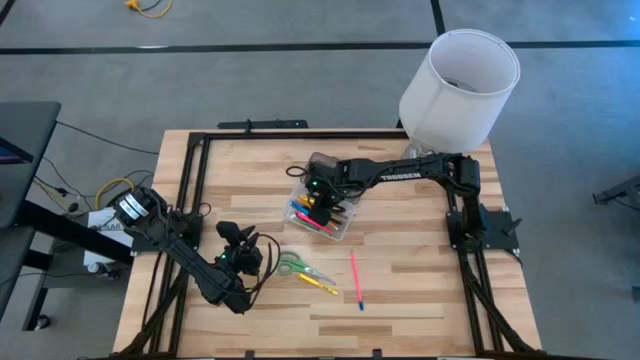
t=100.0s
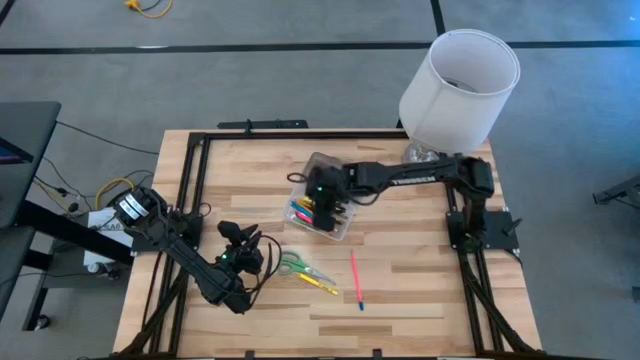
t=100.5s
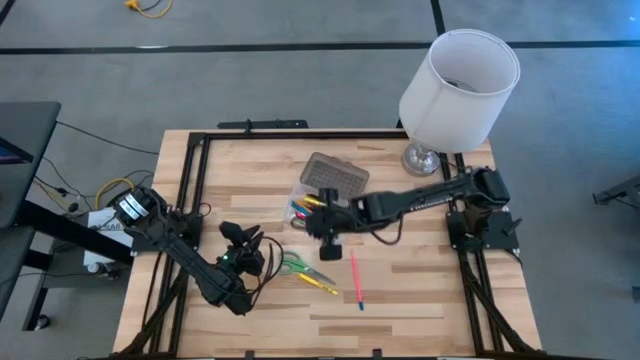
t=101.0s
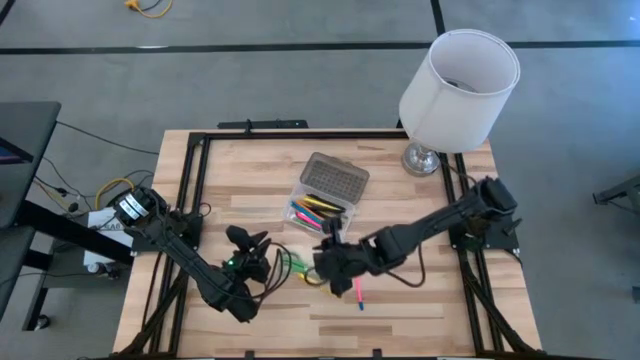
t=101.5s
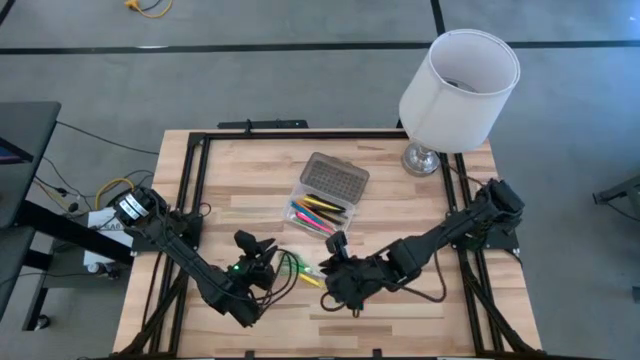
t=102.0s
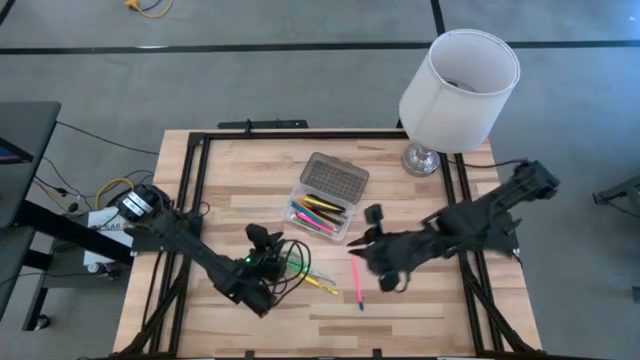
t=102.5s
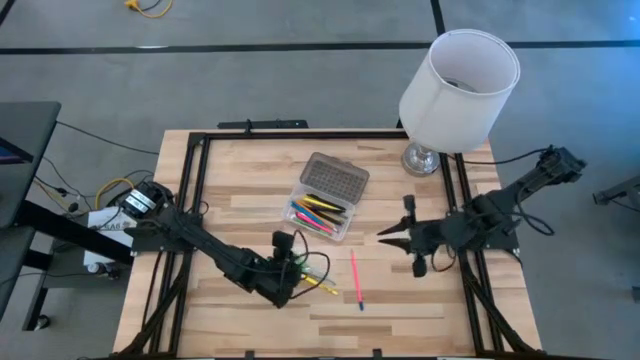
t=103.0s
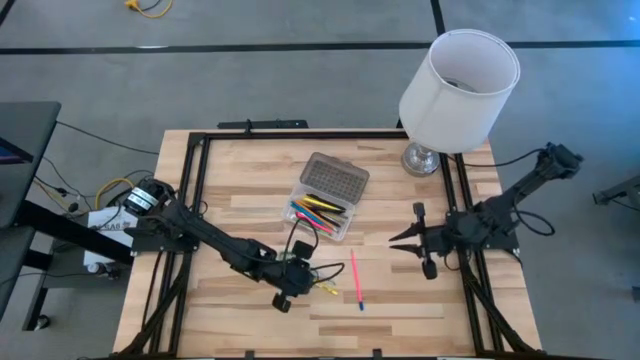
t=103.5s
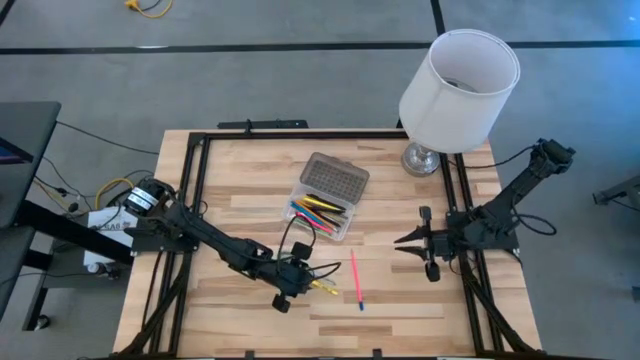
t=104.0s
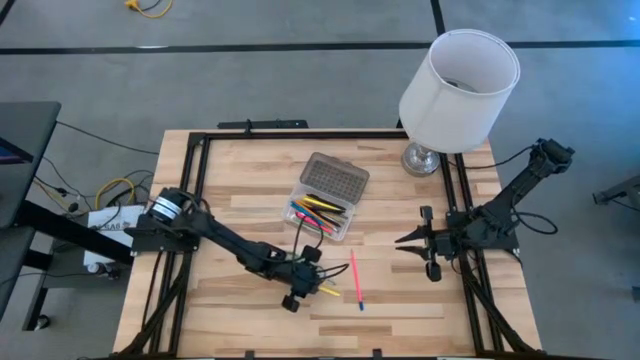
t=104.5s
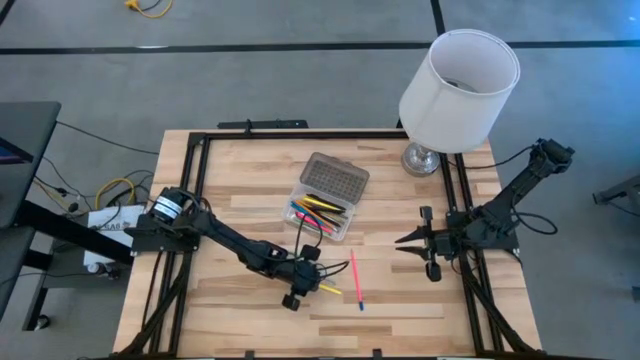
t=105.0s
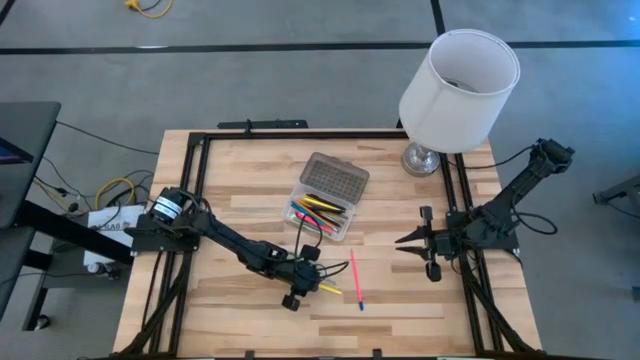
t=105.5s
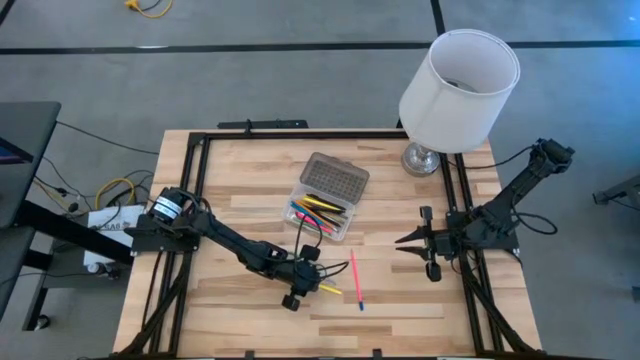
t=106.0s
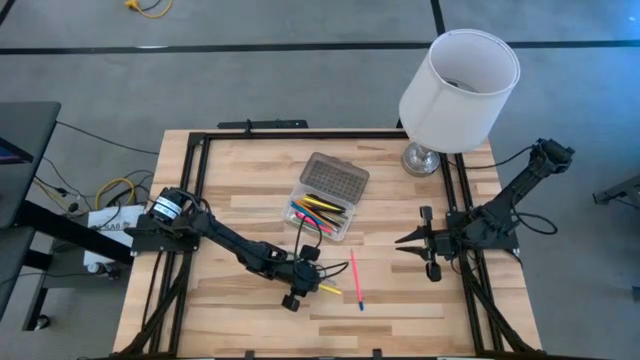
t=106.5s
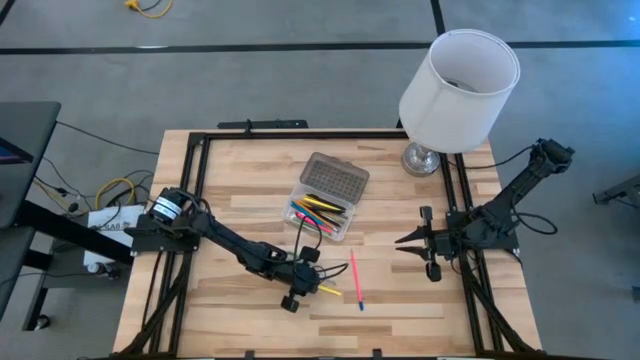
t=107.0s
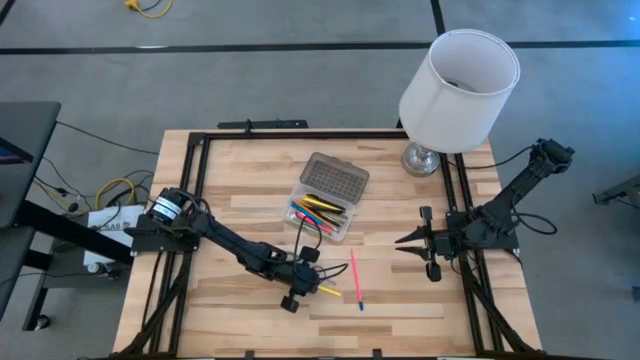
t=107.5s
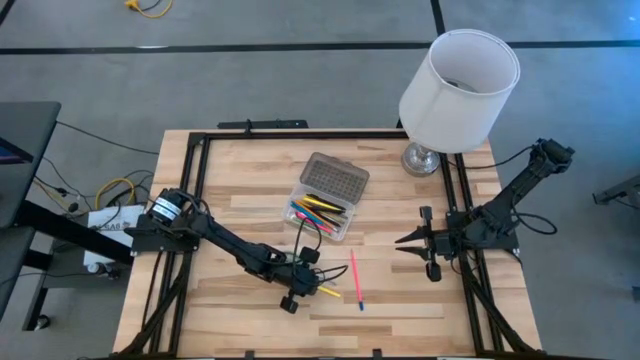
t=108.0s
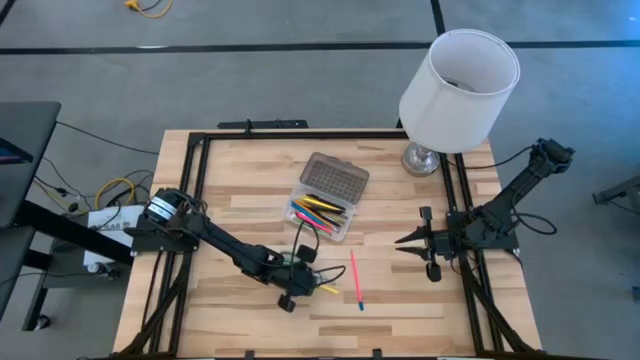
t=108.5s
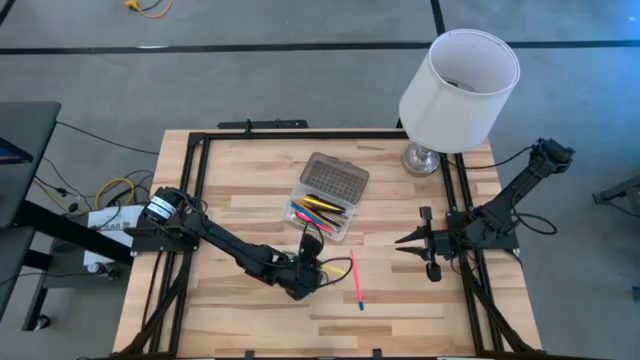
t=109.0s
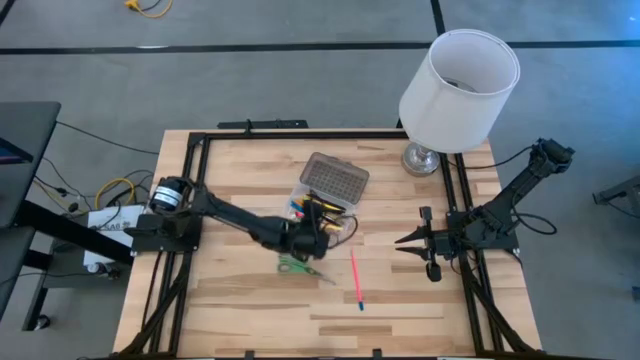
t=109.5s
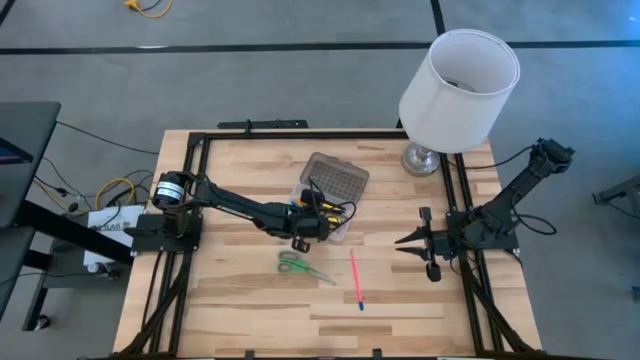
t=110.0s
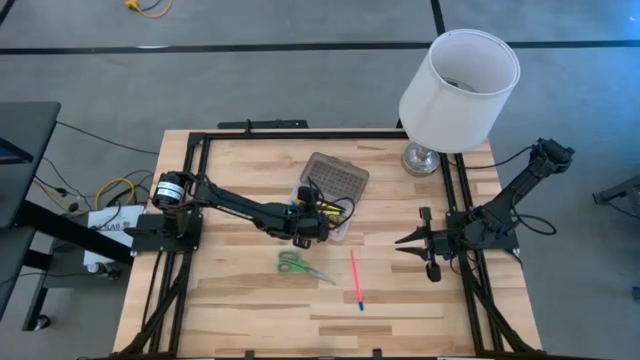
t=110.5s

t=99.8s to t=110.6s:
Task: Pick & place school supplies into a supply box
Put the yellow pen into the gray supply box

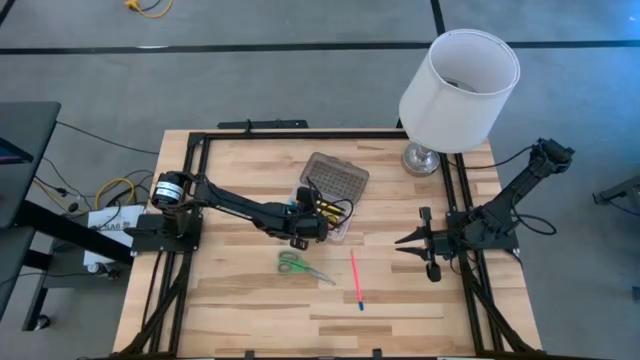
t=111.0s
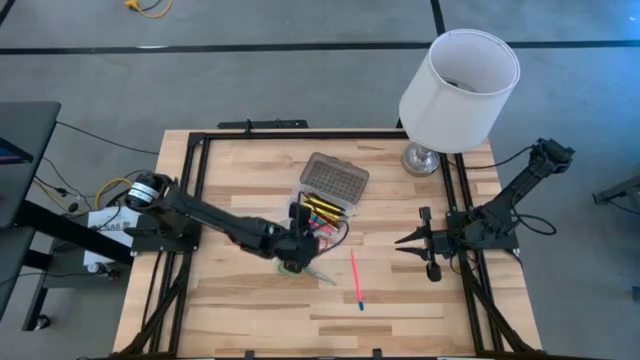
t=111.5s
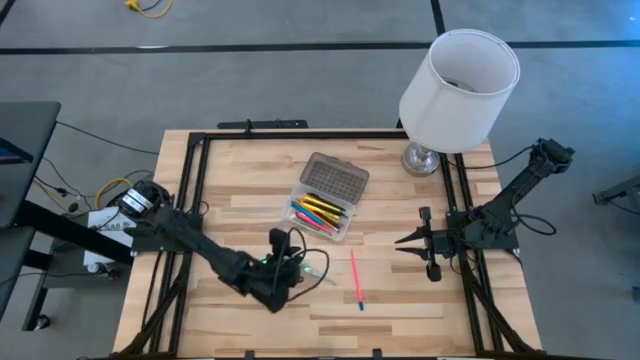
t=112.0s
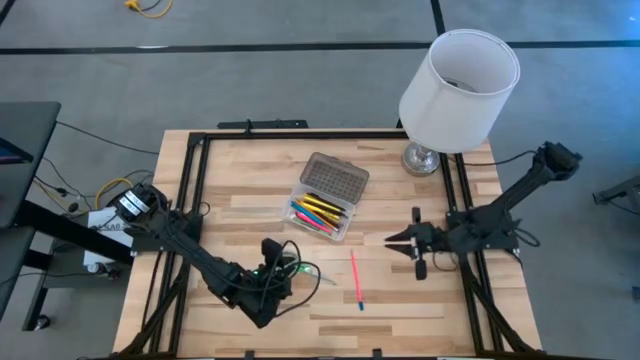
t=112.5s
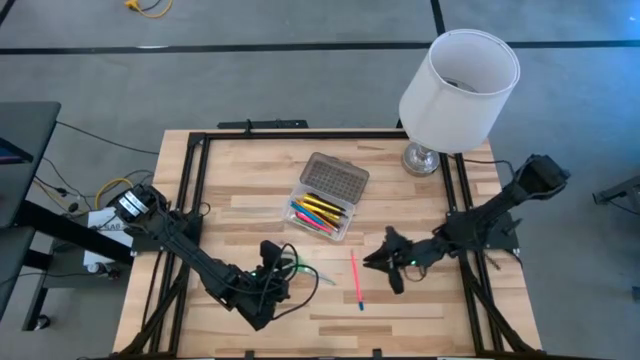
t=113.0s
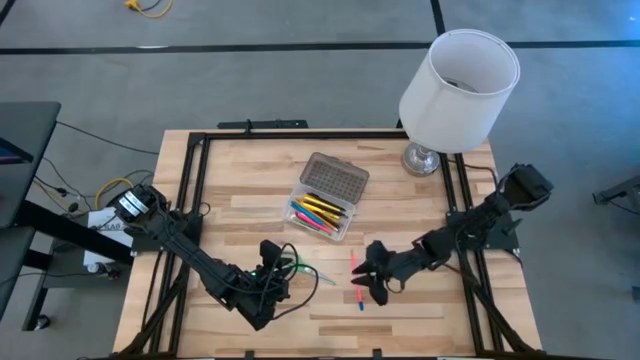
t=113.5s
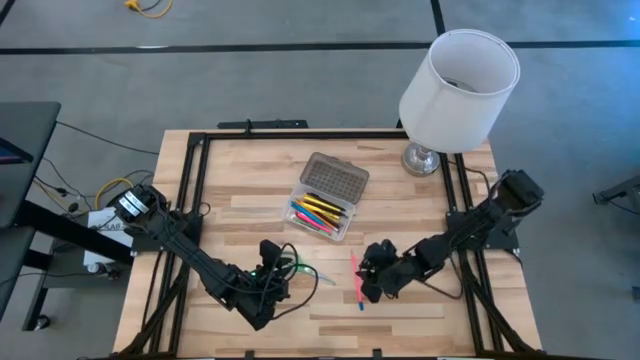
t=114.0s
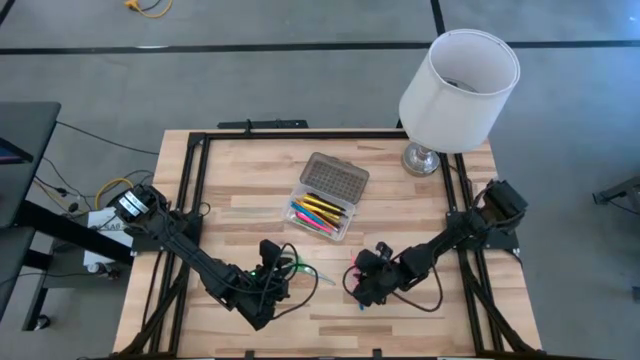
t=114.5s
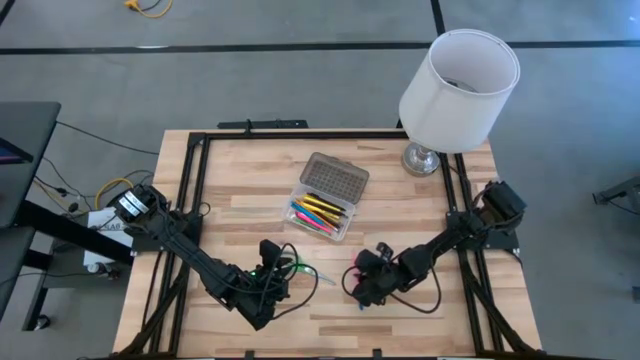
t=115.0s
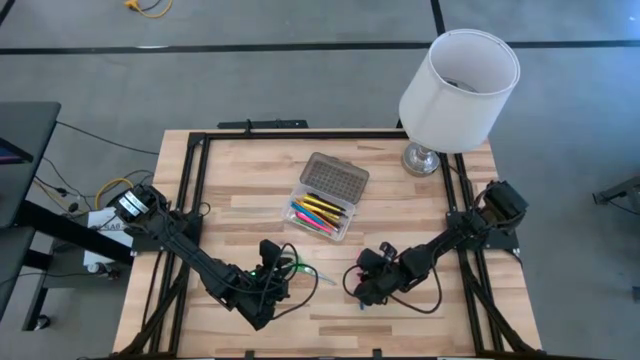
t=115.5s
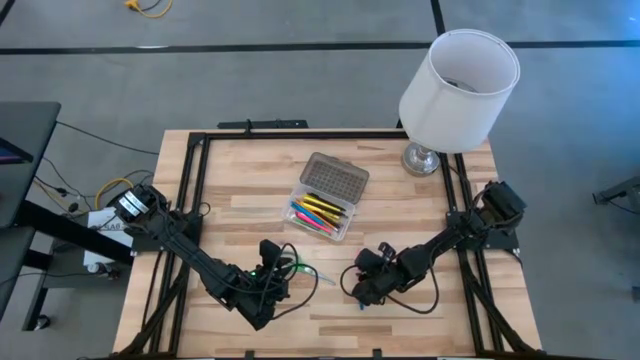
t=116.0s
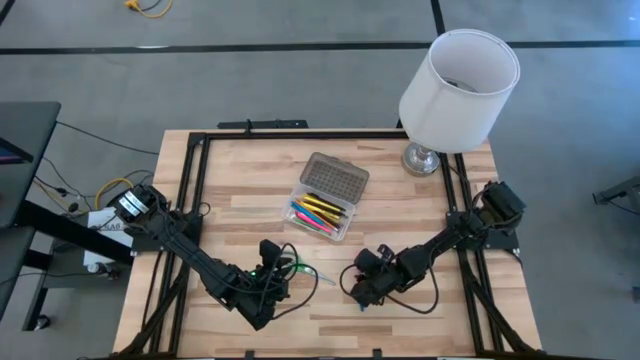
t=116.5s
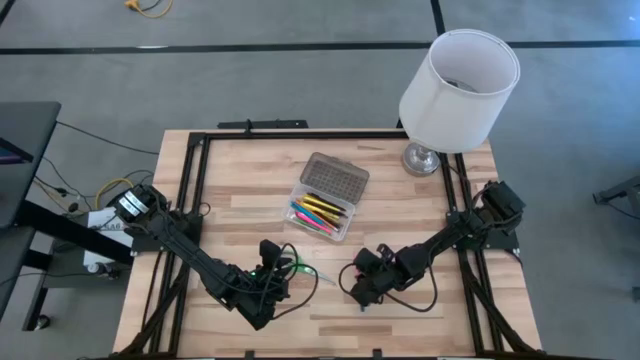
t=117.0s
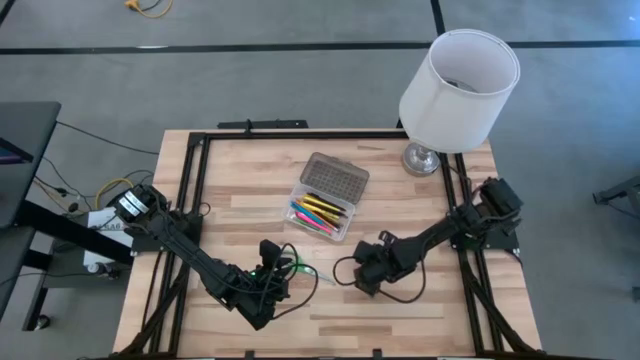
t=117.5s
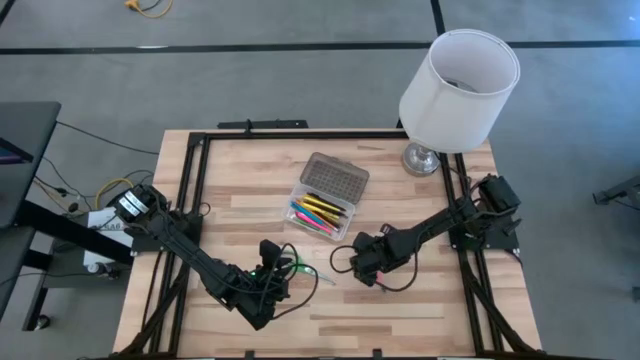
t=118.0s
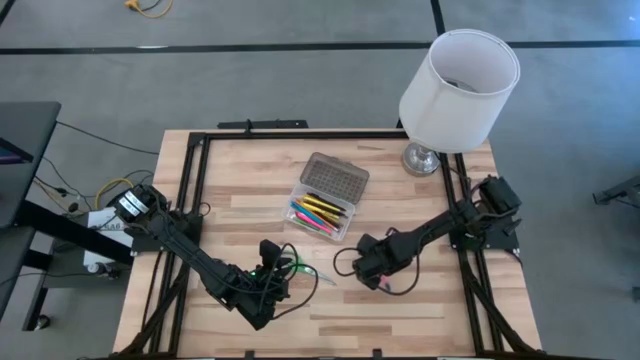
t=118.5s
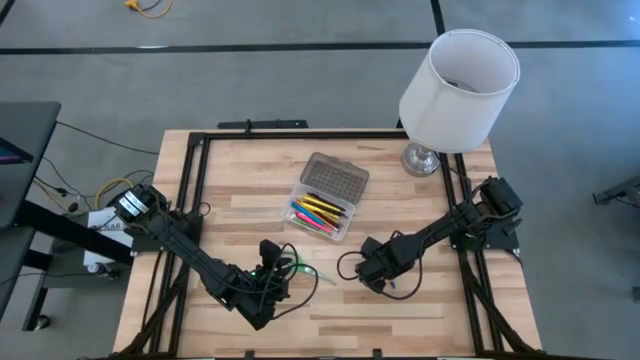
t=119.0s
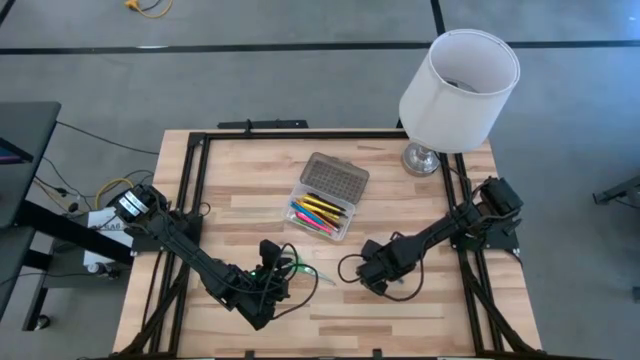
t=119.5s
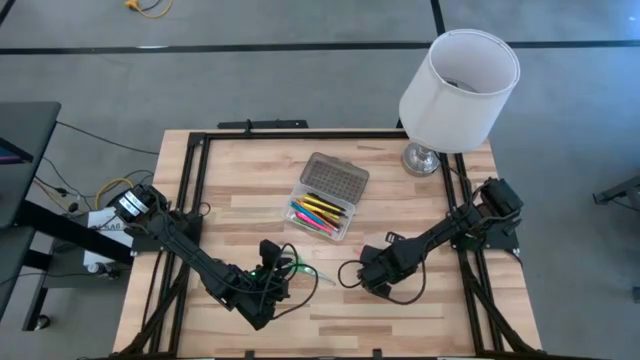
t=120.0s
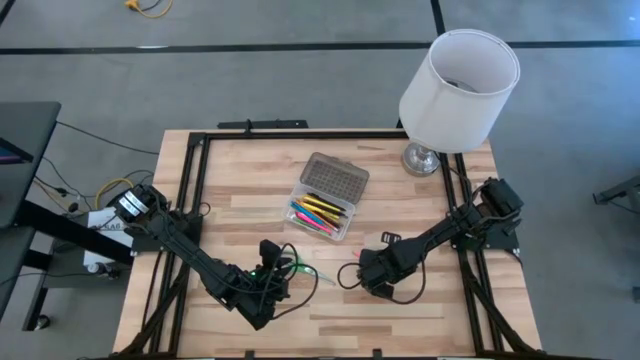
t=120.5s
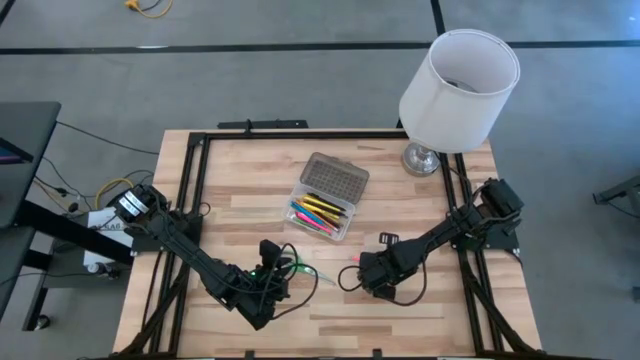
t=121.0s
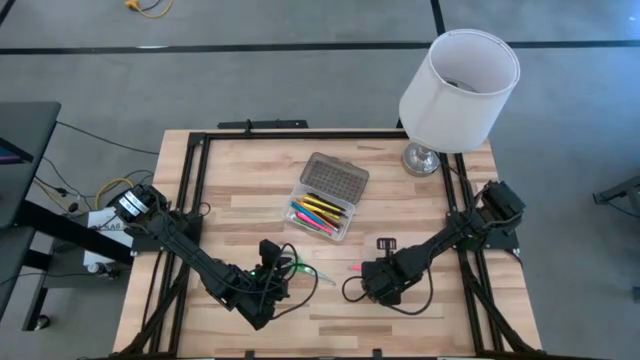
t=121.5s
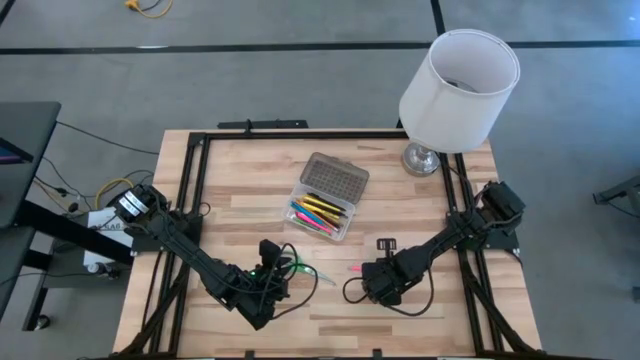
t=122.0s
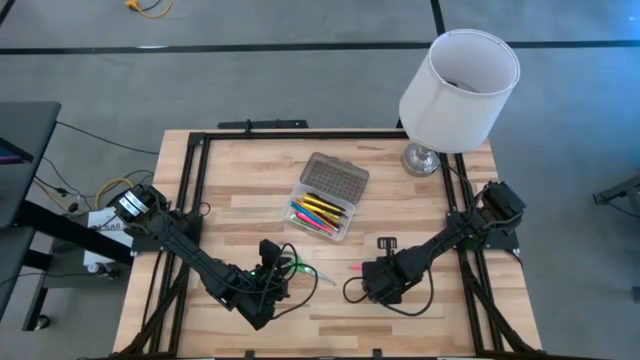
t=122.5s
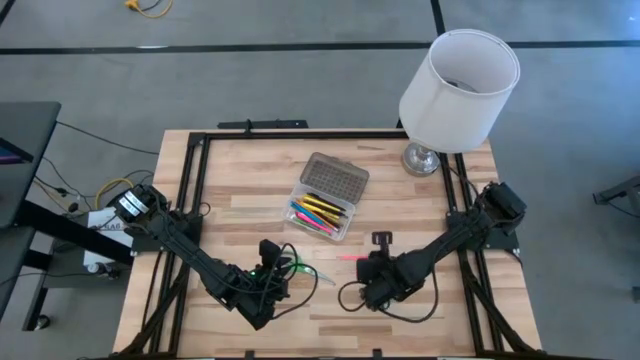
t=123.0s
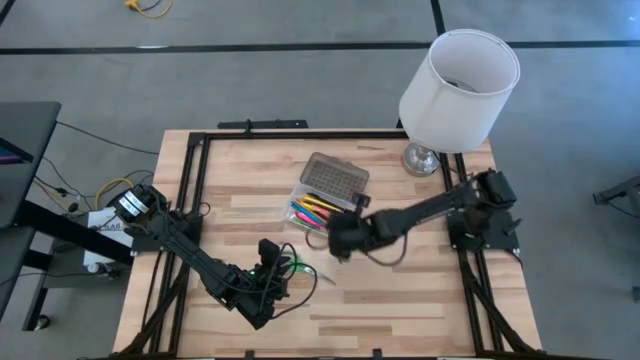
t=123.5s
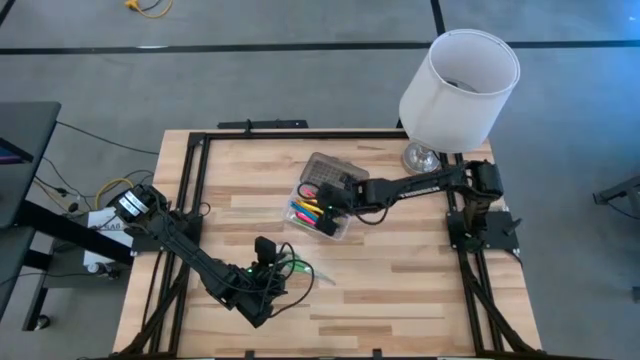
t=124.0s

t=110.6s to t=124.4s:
Put the pink supply into the gray supply box
